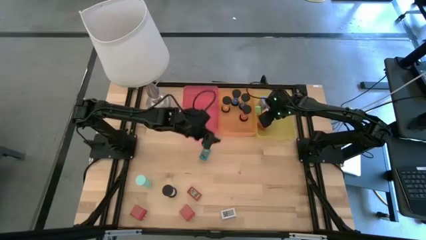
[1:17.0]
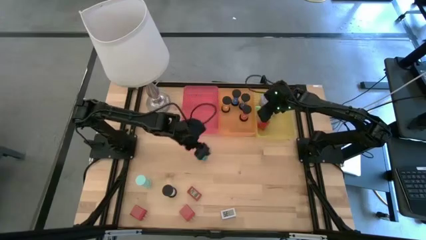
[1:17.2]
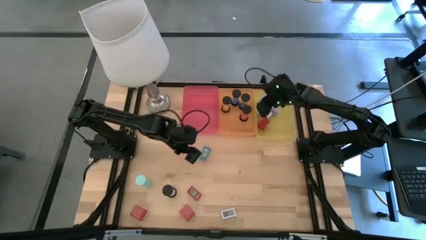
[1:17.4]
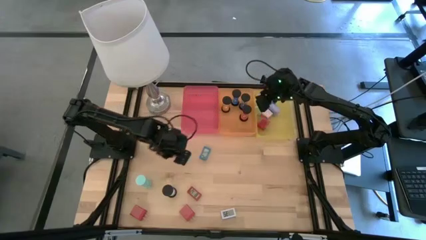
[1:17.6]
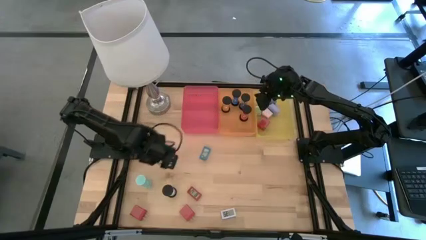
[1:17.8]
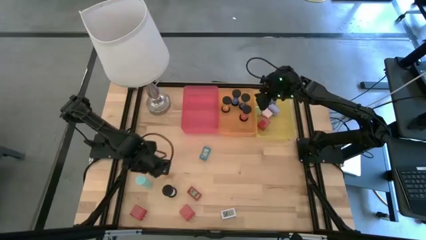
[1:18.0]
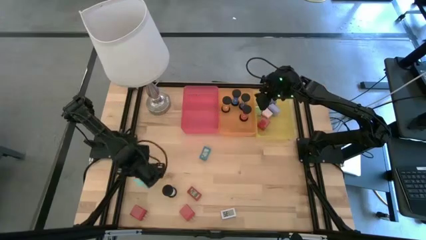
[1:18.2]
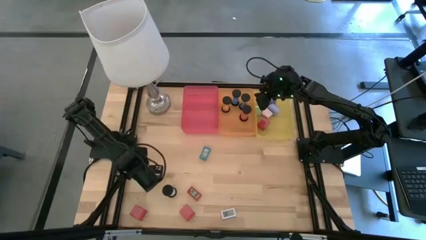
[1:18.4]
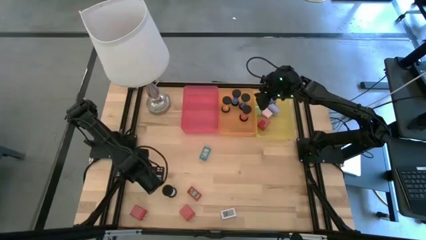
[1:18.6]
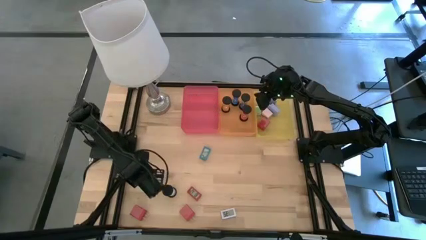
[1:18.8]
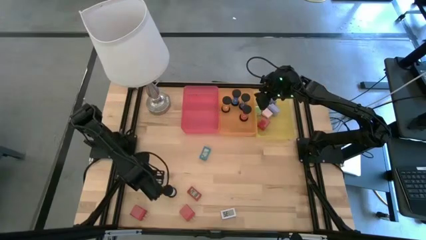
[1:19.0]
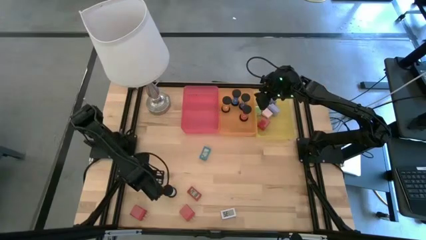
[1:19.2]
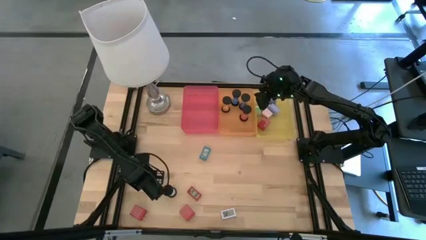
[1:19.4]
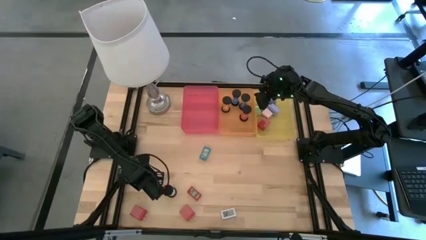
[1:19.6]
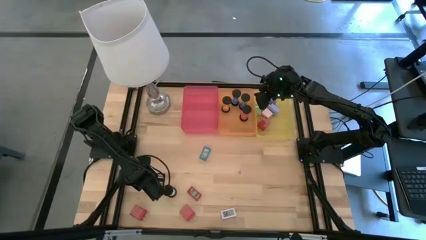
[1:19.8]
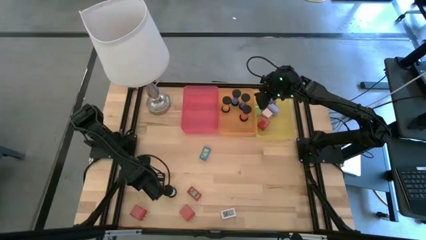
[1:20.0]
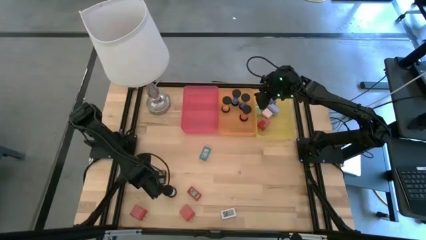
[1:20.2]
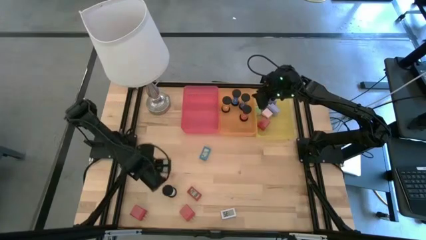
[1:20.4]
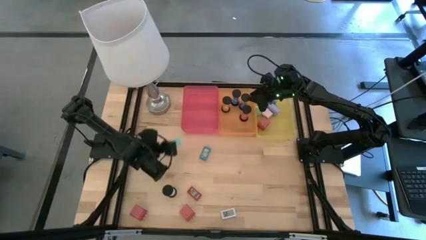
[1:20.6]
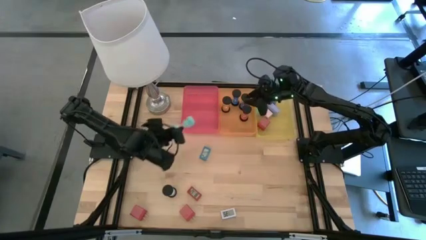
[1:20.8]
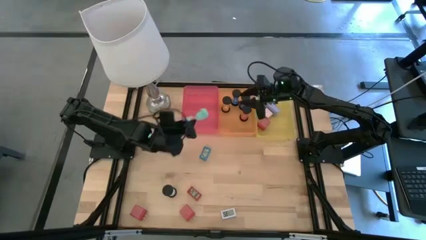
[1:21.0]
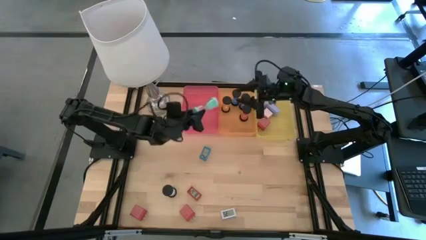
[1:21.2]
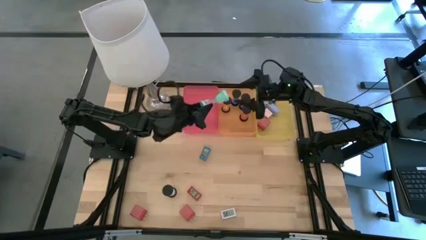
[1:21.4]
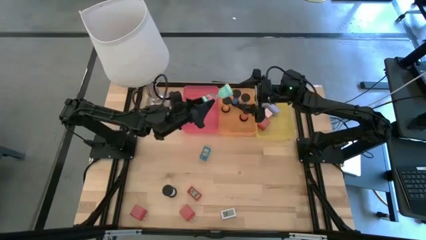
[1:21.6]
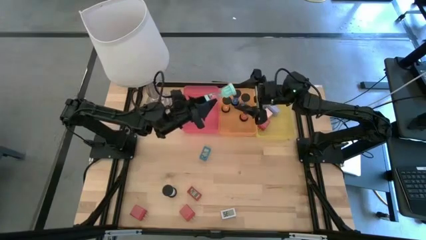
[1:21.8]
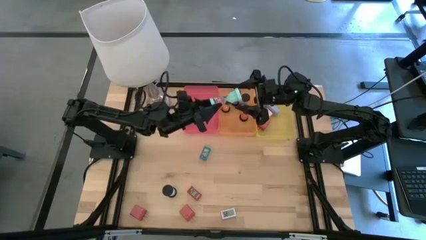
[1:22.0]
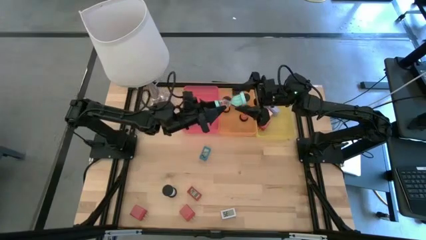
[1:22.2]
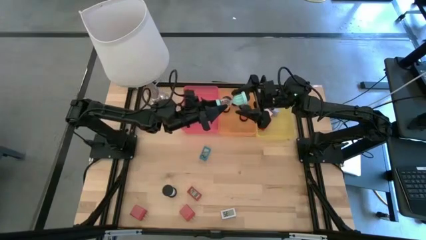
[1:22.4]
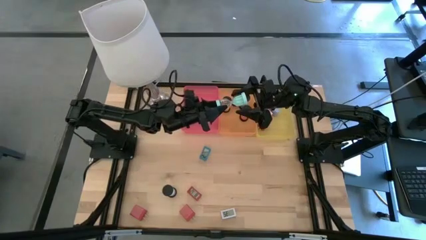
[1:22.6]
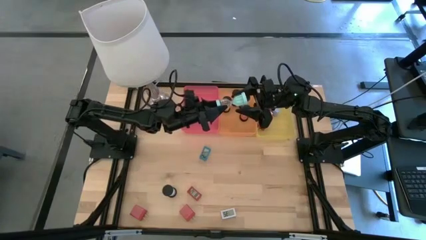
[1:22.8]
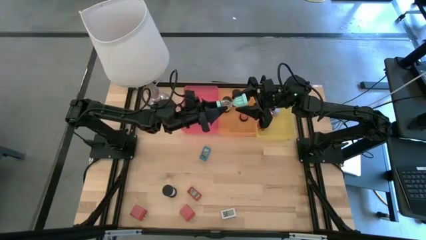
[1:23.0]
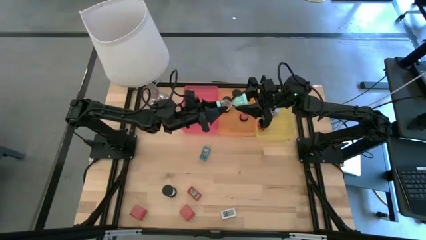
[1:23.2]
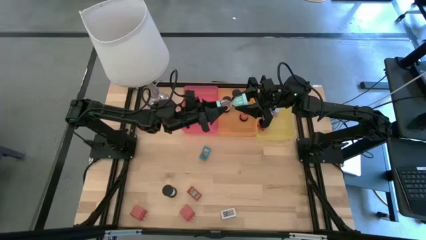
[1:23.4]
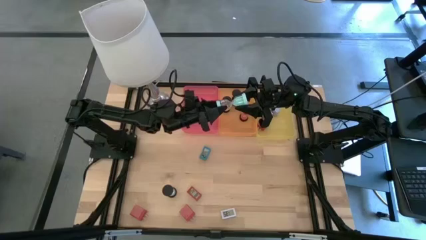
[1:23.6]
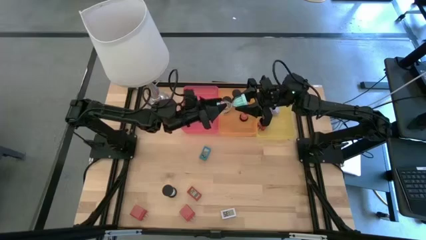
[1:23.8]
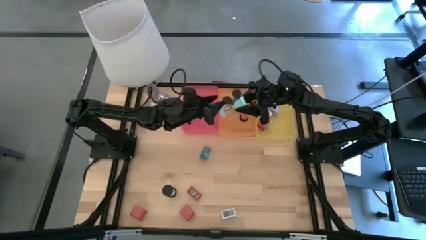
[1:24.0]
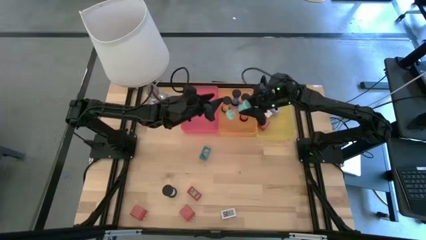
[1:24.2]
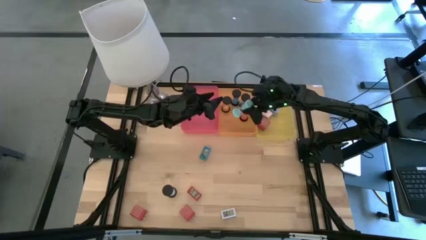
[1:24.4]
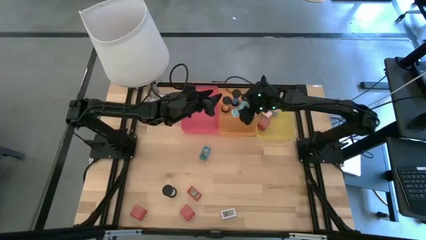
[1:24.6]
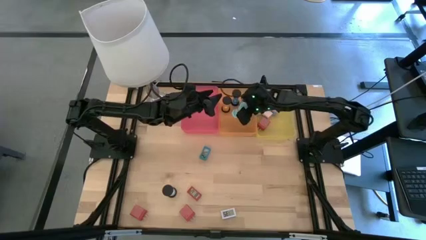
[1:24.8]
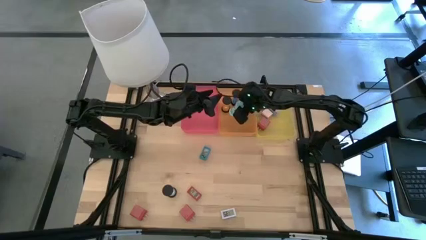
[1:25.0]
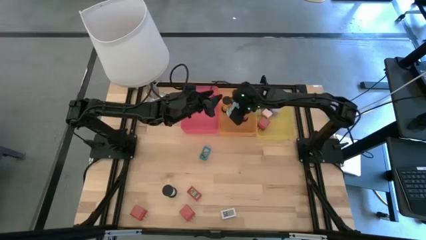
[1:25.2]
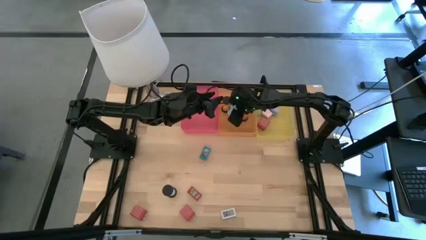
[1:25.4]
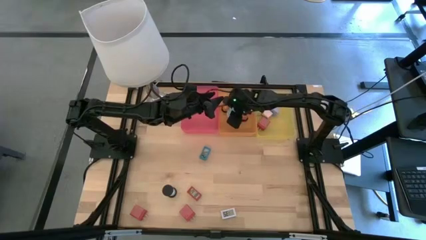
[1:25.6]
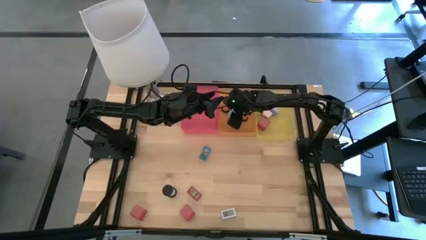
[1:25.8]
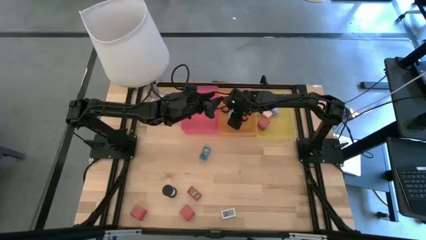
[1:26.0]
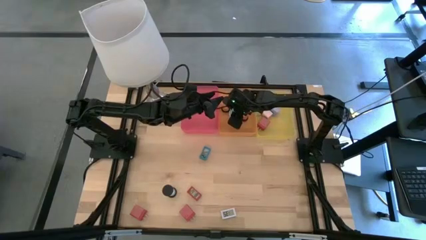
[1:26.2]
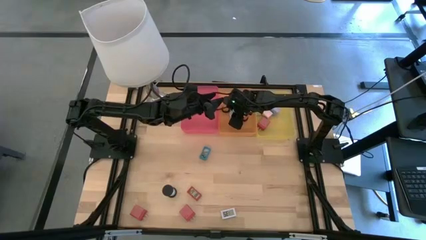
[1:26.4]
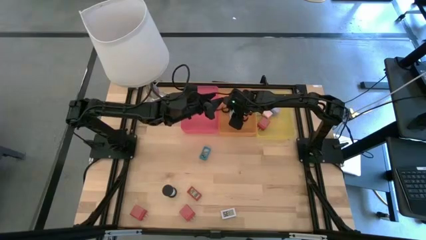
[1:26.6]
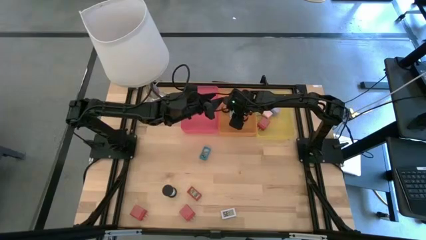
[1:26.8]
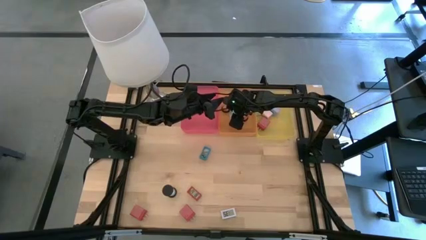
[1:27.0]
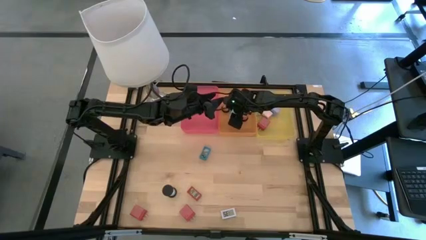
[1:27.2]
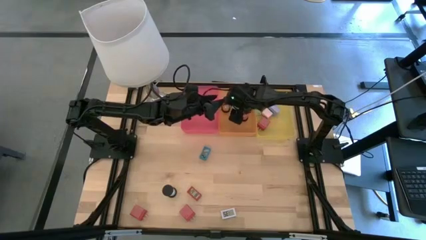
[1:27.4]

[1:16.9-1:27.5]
Task: Pick & Place Office items
Put the light blue hourglass into the orange bin

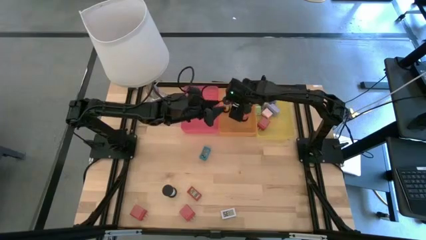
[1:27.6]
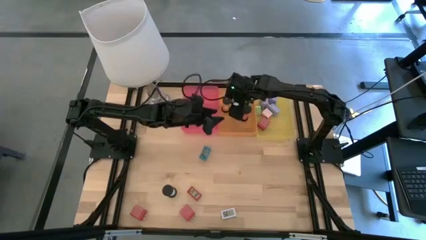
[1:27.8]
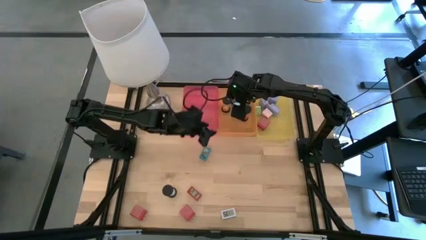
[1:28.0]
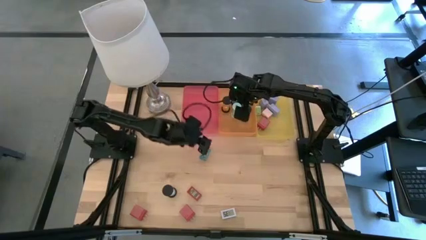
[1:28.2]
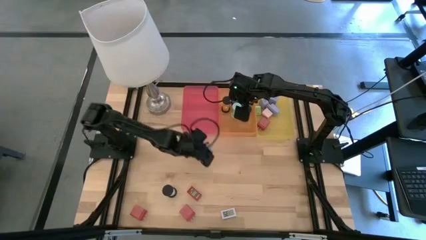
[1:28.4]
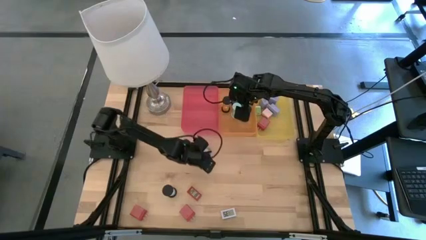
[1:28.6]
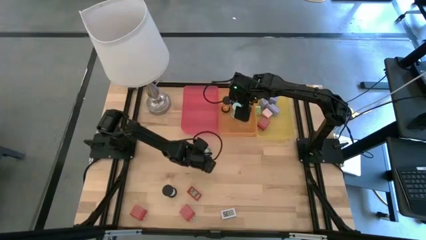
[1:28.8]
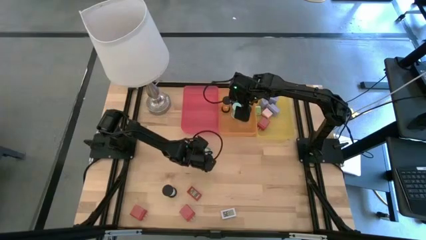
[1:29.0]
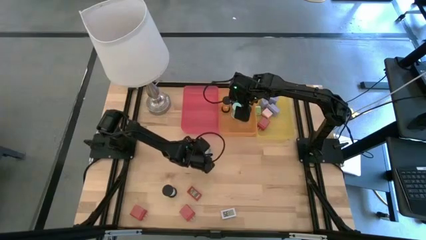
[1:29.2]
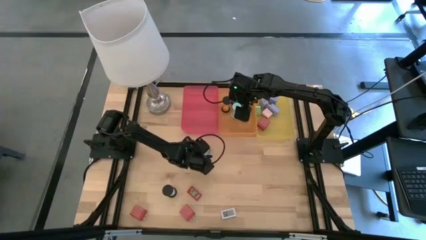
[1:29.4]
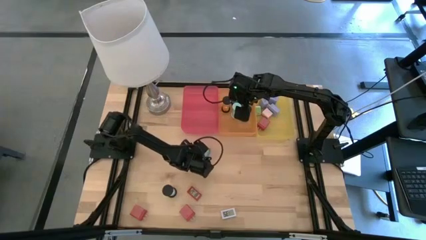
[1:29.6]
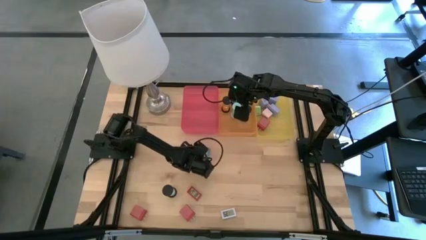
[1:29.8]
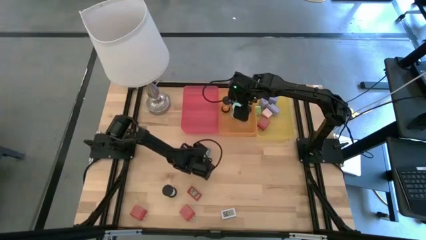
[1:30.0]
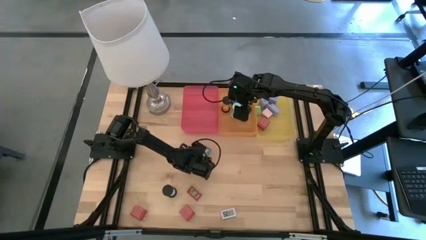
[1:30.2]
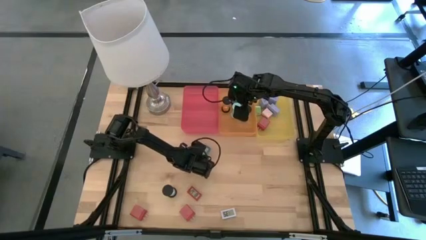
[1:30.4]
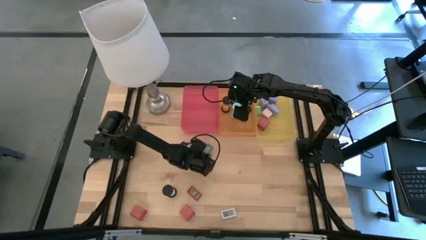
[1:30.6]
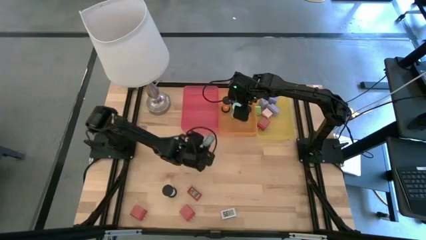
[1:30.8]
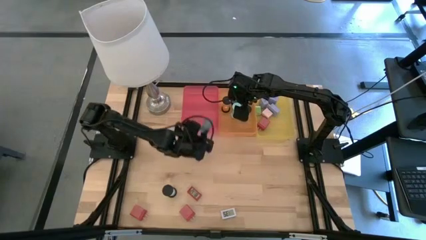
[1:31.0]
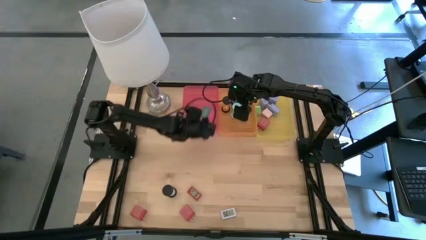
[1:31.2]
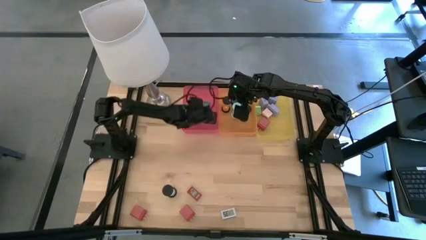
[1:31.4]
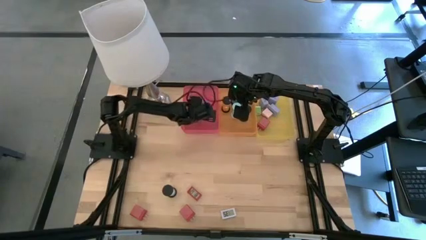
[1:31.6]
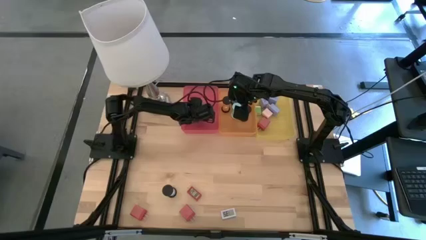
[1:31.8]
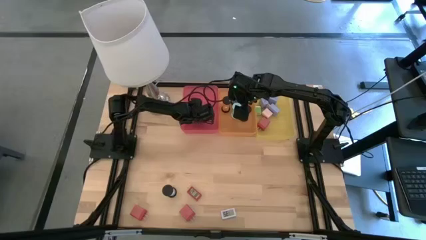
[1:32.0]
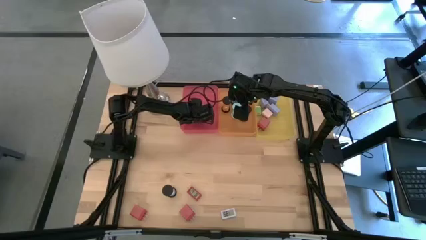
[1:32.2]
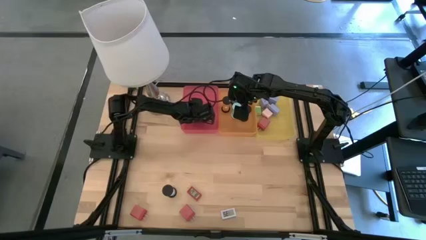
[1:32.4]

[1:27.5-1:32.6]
Put the blue digital clock into the pink bin
